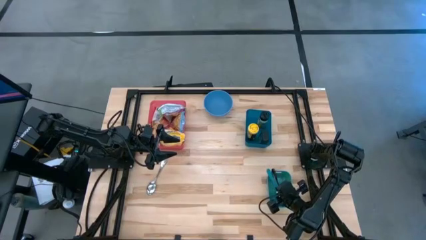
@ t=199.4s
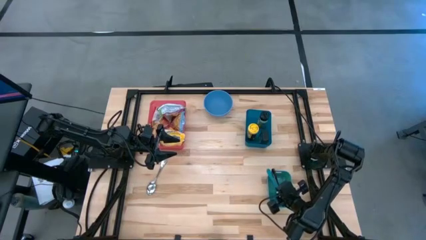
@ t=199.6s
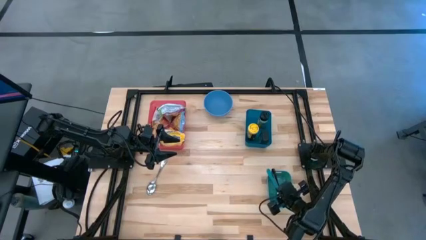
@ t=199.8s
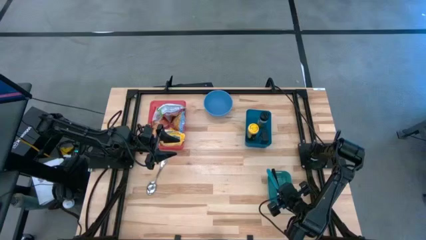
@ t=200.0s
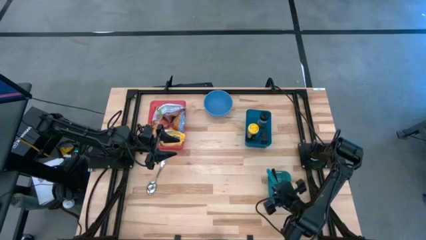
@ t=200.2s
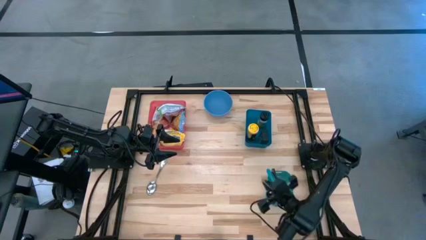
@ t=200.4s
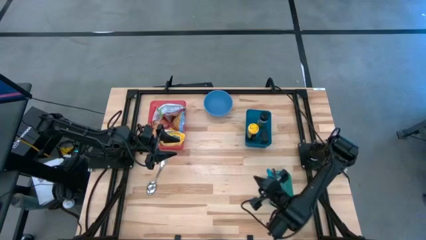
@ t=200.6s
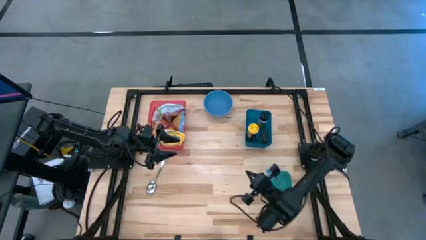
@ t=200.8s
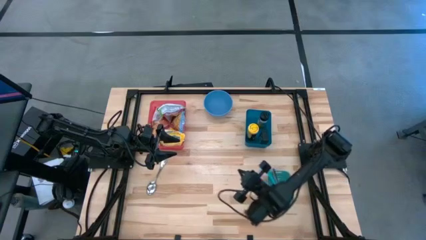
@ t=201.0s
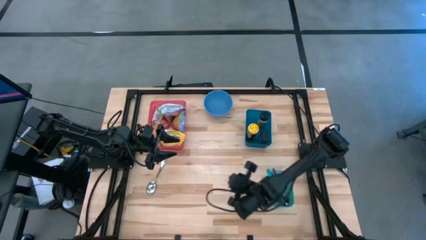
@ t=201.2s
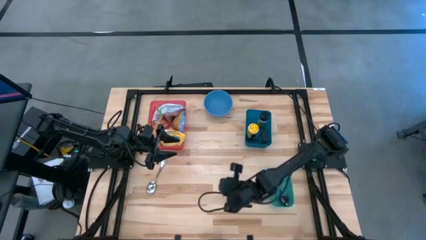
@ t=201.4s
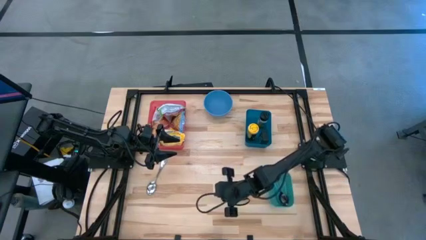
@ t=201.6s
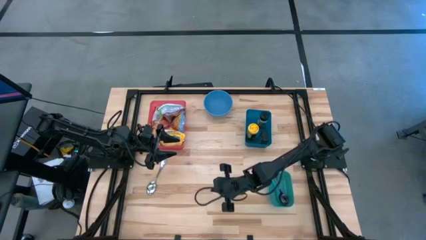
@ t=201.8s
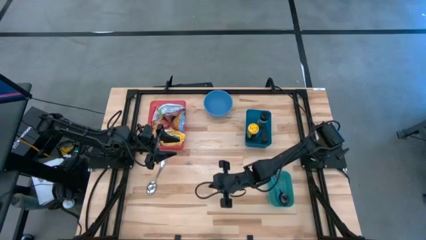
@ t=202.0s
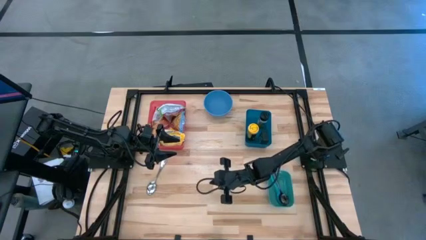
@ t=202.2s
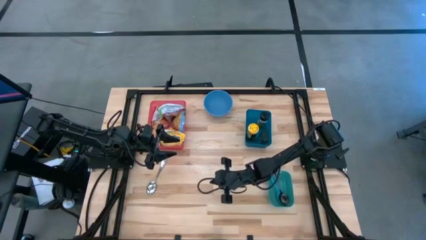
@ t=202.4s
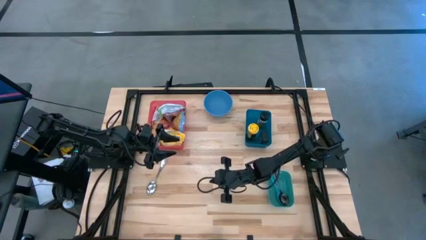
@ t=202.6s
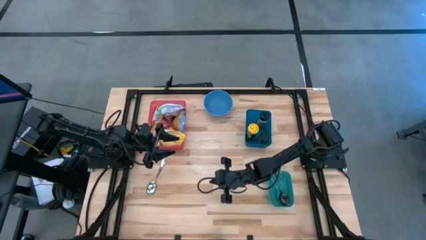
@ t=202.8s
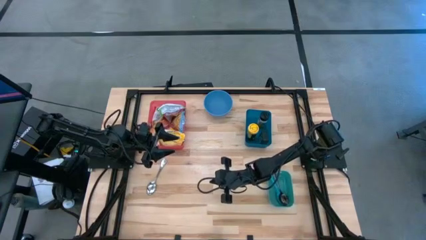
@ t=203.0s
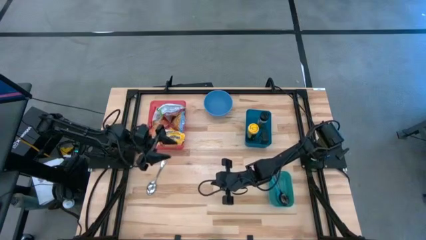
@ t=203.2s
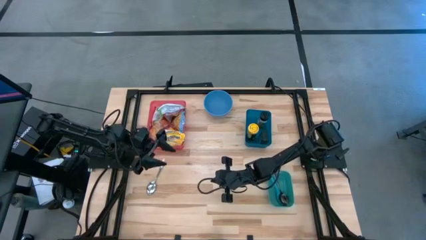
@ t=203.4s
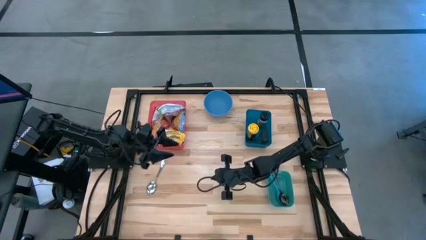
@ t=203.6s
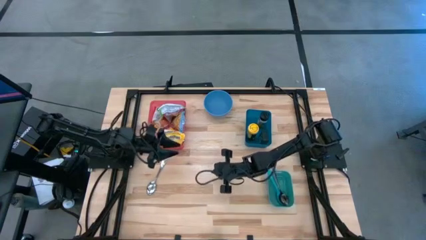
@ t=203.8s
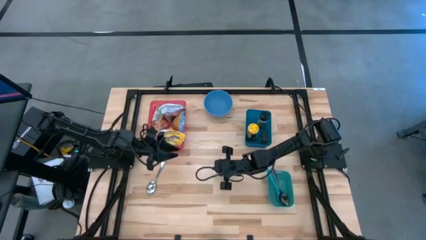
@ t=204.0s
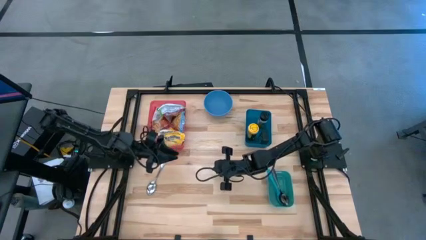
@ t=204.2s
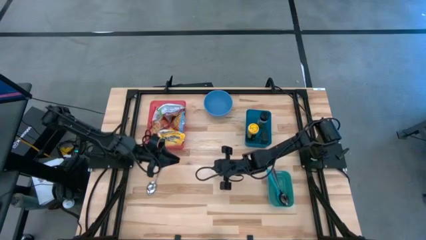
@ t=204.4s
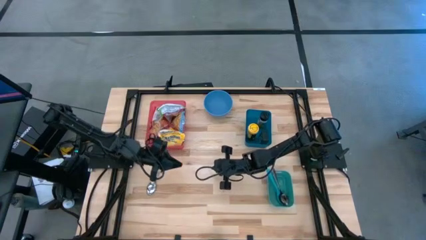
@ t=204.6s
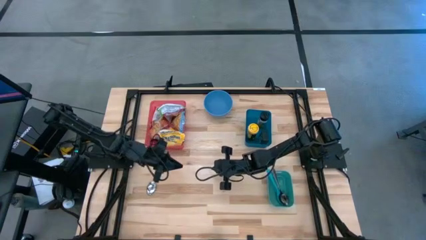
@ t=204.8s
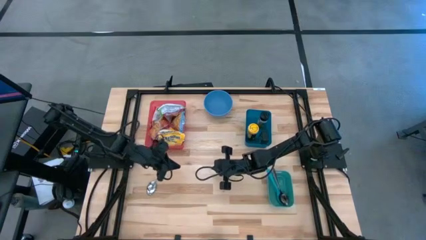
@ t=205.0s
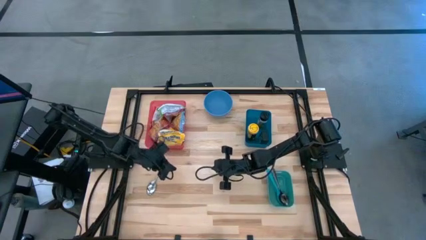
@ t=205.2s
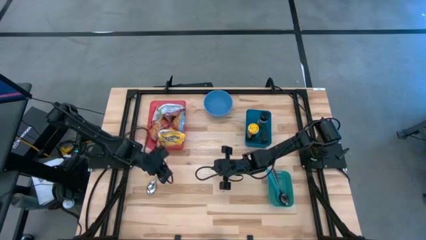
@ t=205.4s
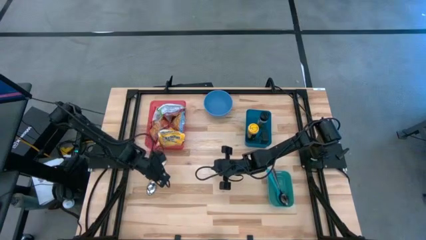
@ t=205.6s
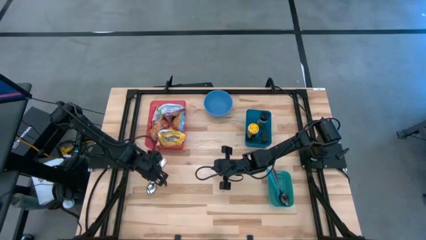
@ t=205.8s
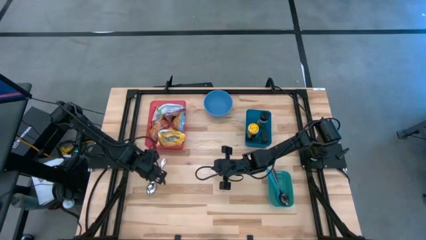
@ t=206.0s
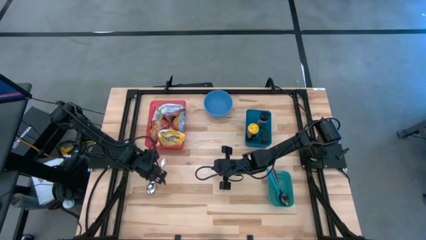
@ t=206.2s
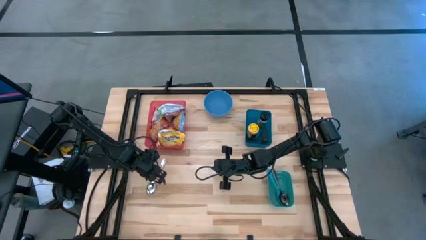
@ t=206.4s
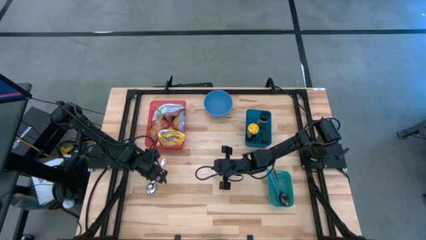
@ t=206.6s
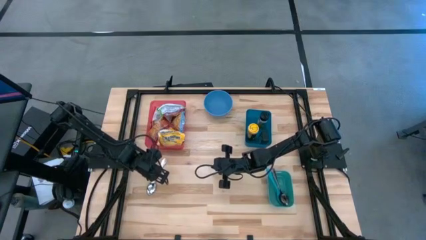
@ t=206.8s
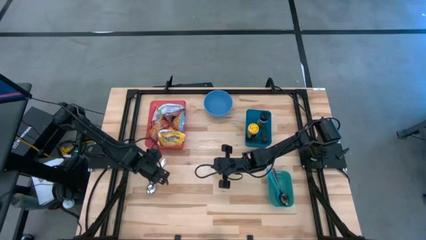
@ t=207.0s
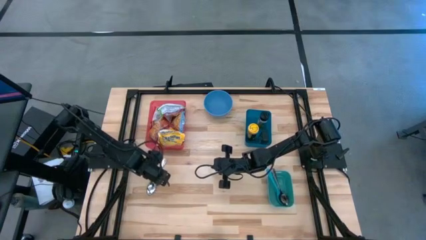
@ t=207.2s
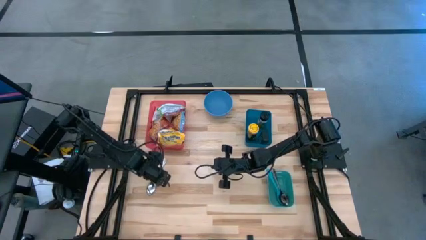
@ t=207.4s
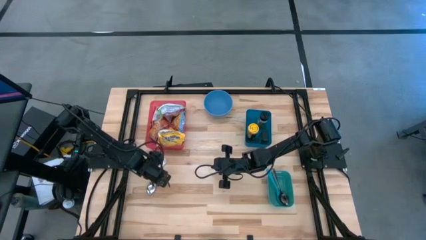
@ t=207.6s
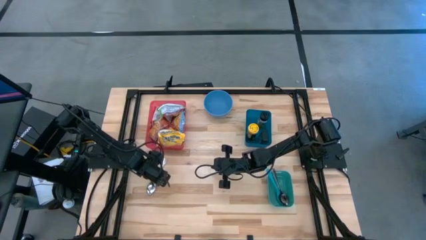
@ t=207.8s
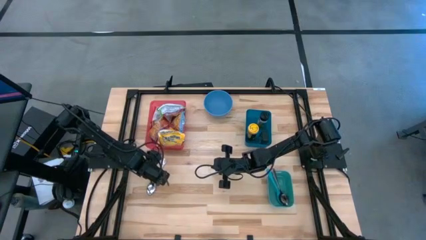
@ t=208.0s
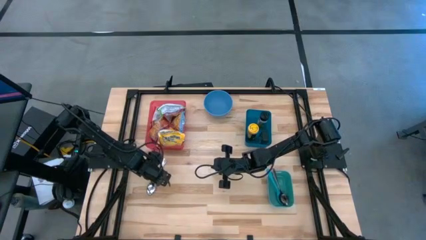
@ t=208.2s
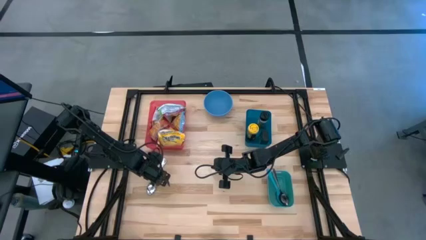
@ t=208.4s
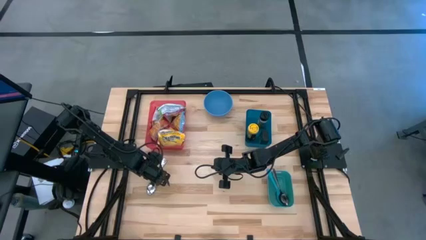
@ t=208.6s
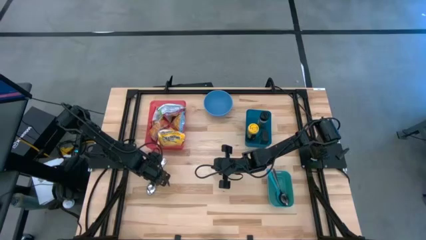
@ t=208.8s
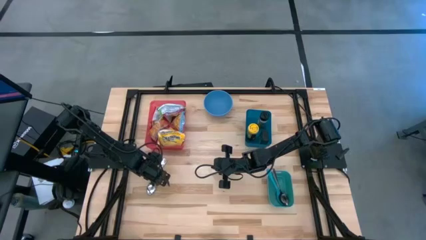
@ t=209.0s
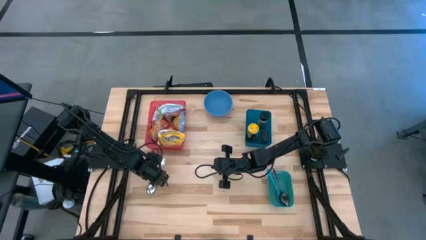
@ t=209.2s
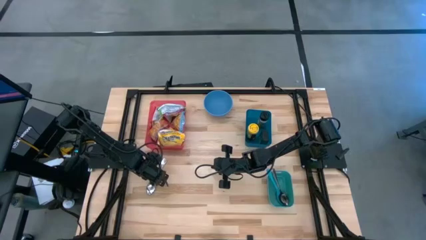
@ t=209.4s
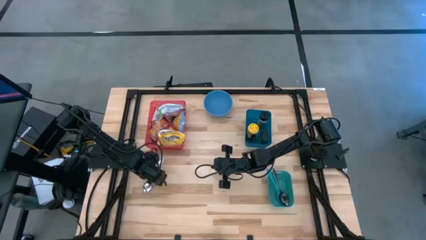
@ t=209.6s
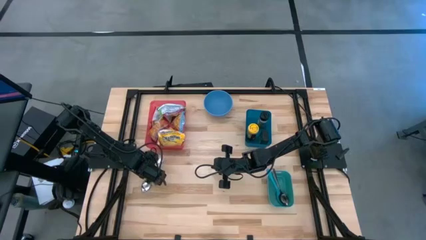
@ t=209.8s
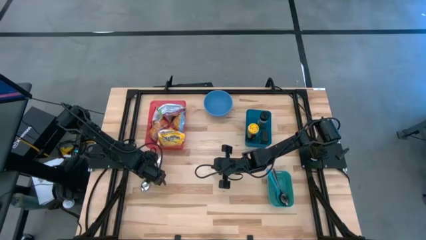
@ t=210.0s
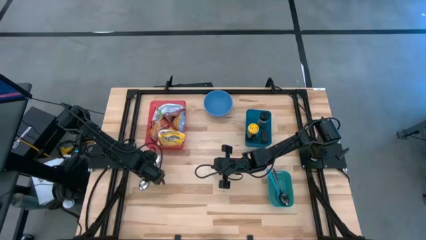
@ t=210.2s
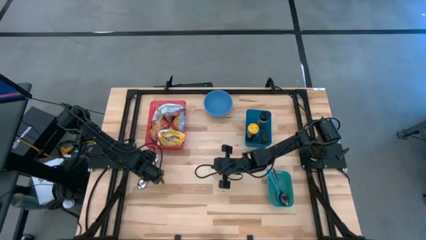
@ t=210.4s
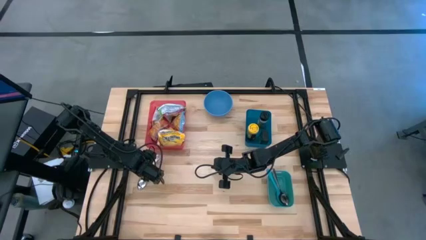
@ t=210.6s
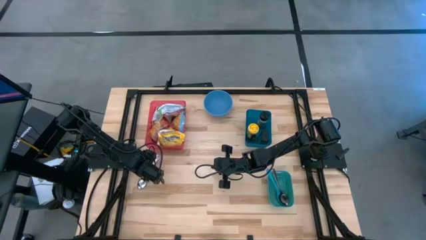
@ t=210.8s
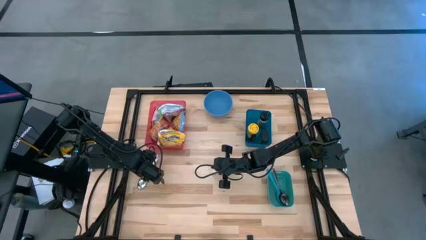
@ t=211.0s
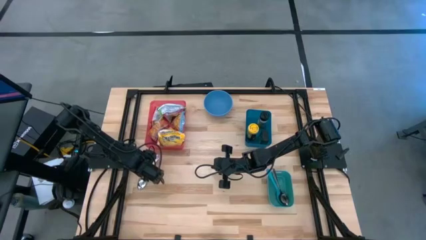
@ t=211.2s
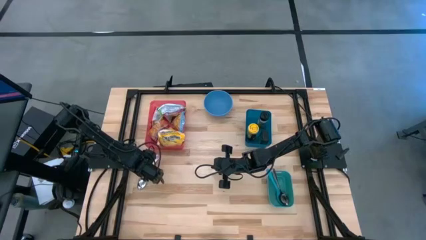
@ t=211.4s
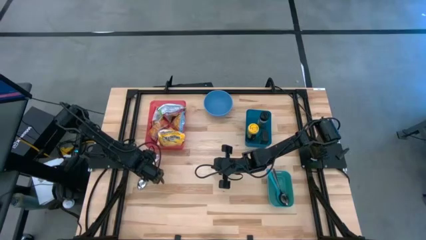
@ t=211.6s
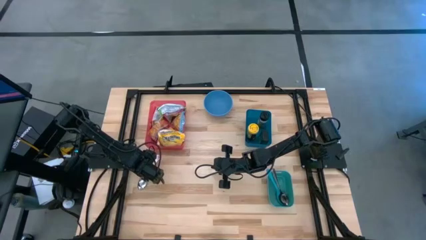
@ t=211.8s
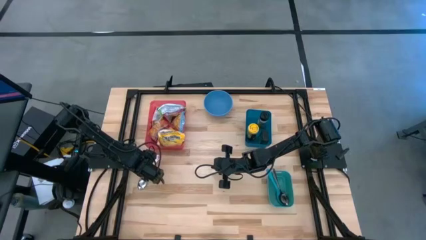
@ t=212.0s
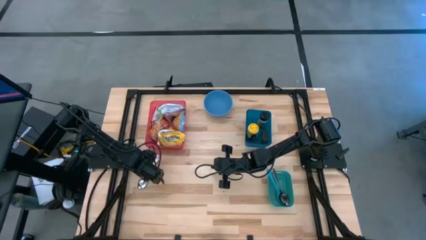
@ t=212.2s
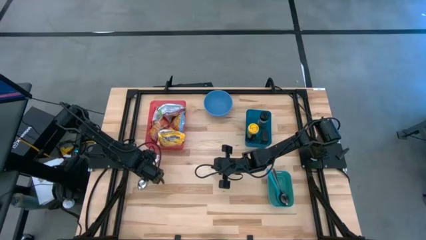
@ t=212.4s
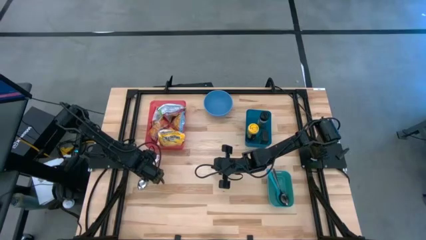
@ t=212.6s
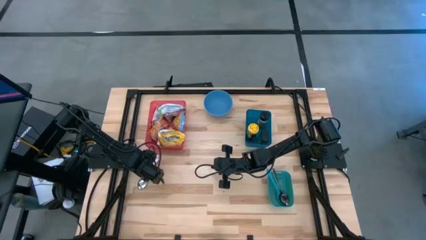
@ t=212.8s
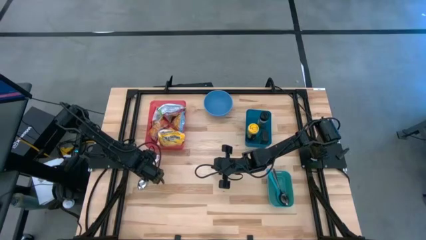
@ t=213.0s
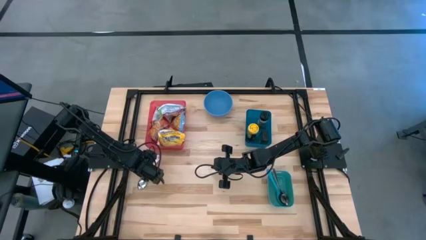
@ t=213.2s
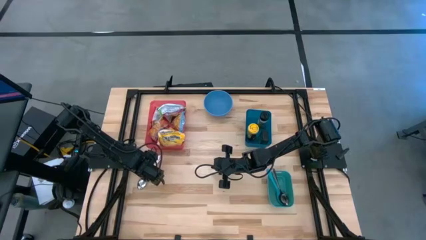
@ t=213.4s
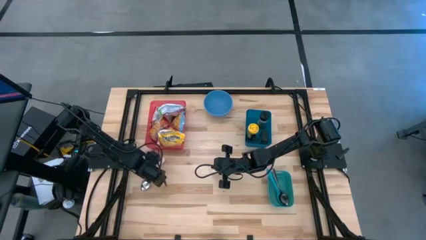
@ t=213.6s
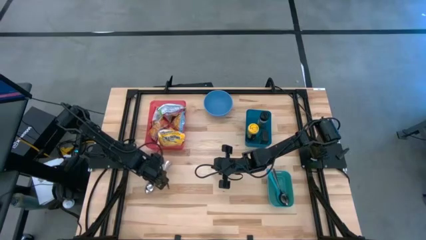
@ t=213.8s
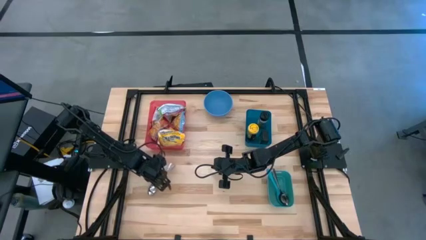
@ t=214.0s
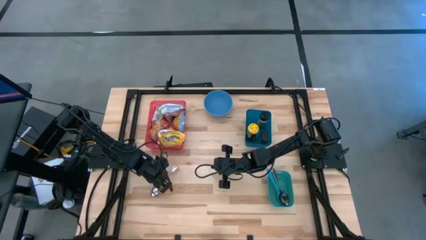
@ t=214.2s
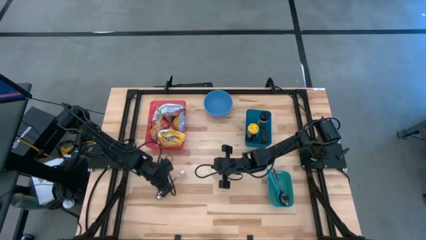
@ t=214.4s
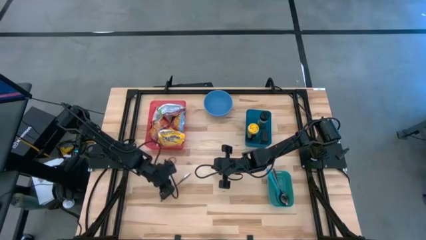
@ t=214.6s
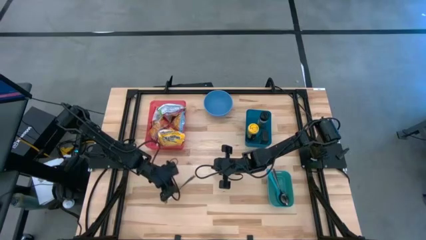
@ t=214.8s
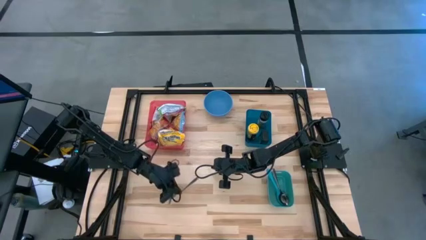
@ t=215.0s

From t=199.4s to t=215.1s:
Task: Pick & Place Food Item
Put the silver spoon into the green bin
